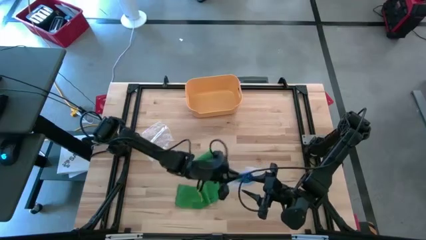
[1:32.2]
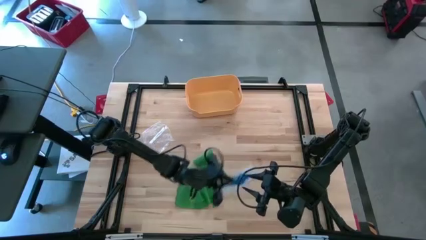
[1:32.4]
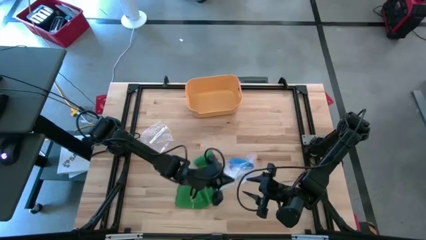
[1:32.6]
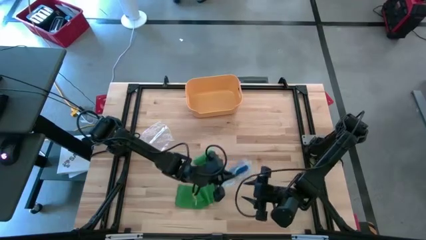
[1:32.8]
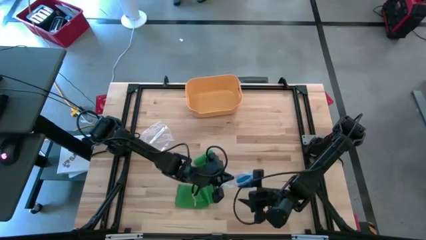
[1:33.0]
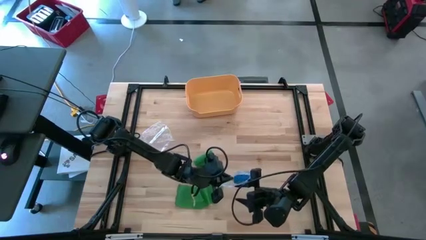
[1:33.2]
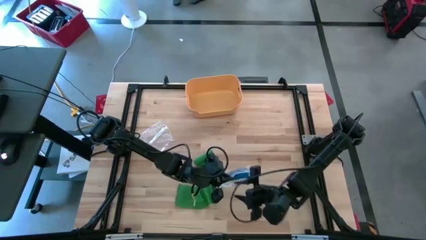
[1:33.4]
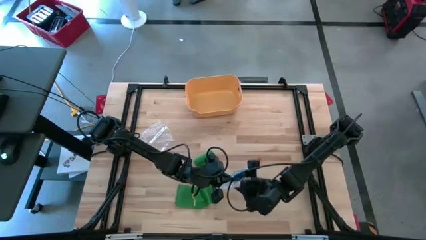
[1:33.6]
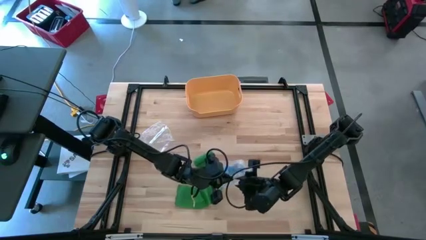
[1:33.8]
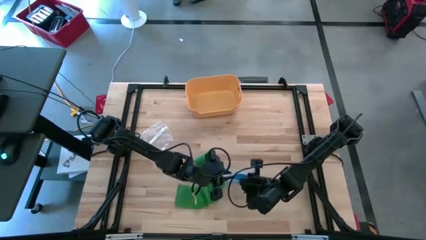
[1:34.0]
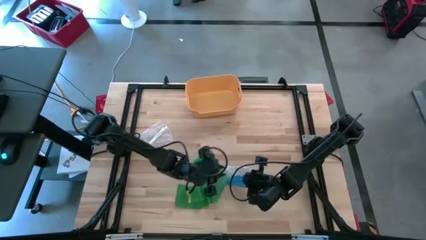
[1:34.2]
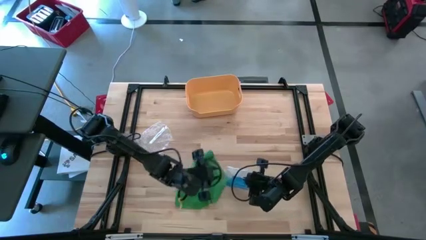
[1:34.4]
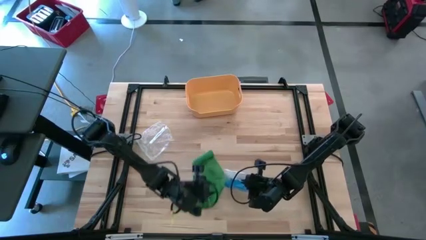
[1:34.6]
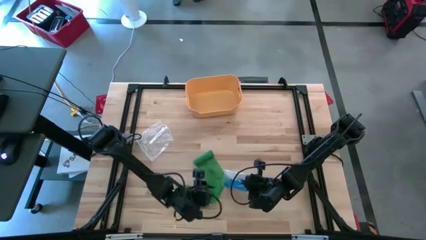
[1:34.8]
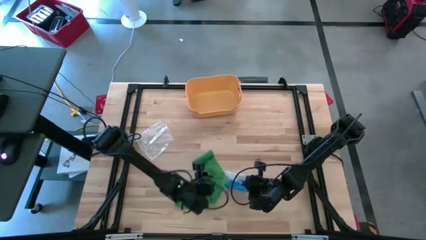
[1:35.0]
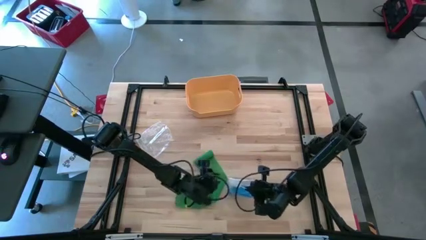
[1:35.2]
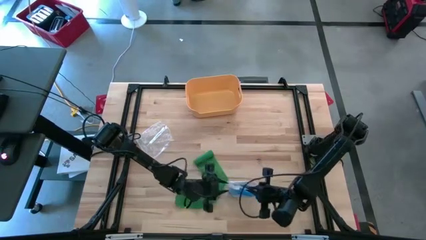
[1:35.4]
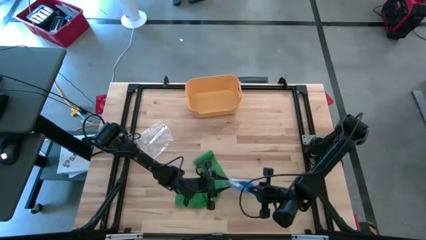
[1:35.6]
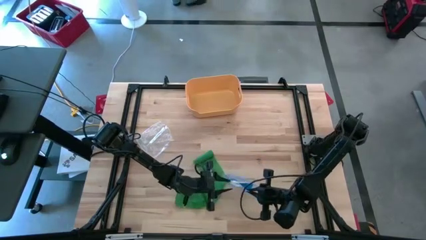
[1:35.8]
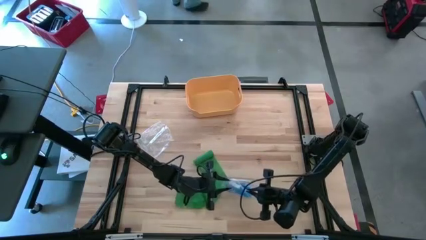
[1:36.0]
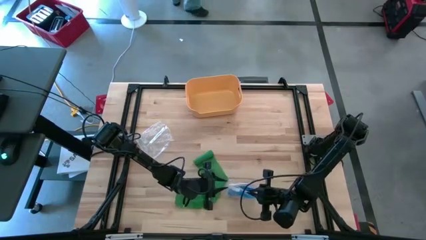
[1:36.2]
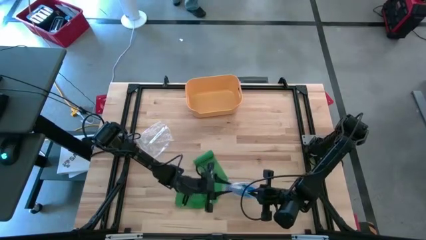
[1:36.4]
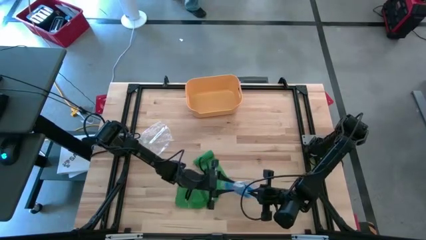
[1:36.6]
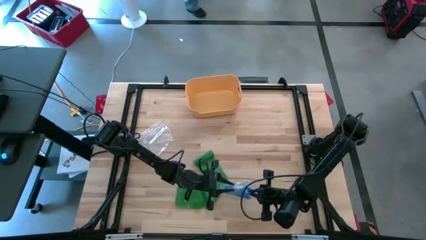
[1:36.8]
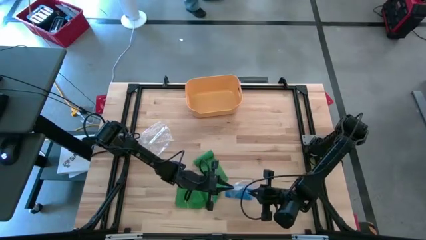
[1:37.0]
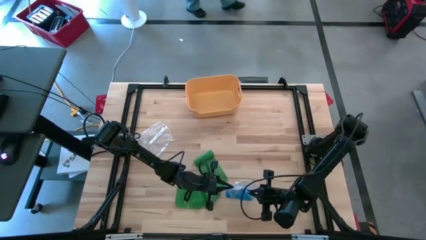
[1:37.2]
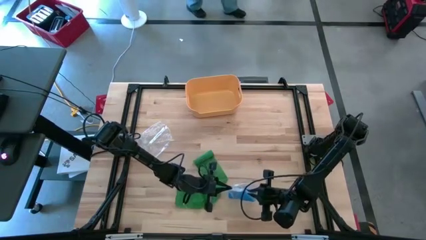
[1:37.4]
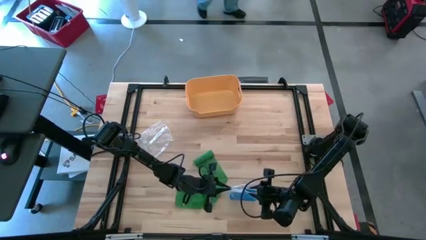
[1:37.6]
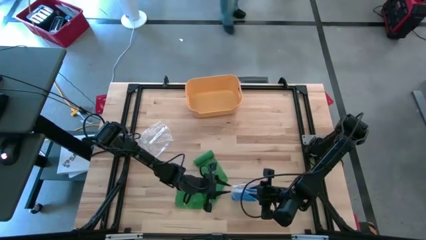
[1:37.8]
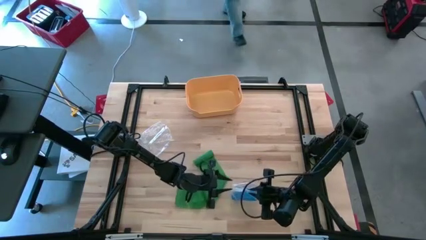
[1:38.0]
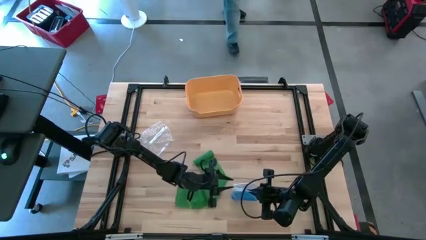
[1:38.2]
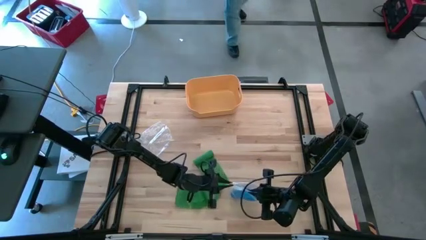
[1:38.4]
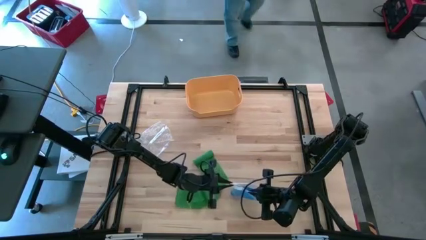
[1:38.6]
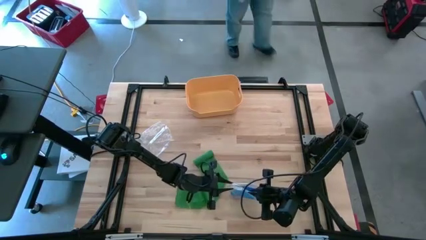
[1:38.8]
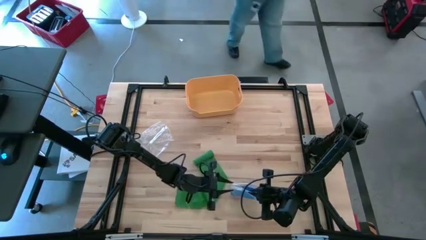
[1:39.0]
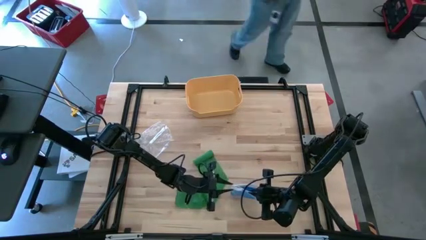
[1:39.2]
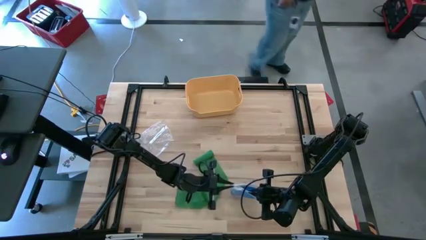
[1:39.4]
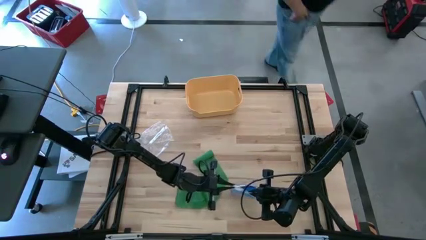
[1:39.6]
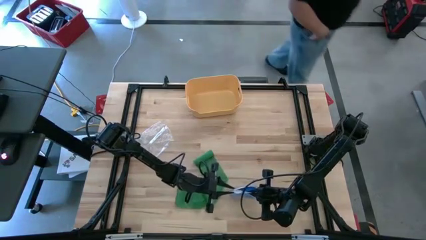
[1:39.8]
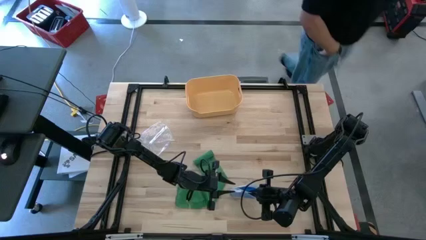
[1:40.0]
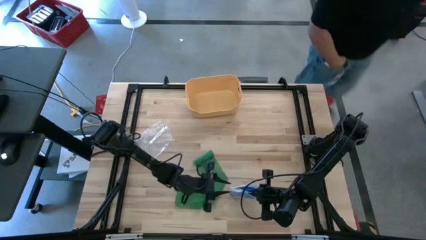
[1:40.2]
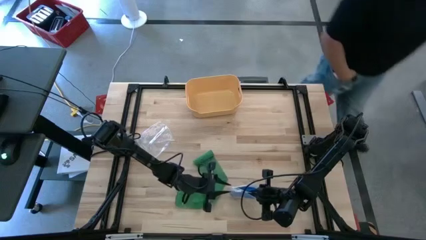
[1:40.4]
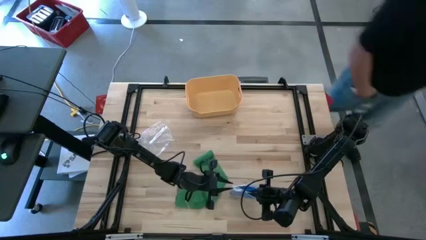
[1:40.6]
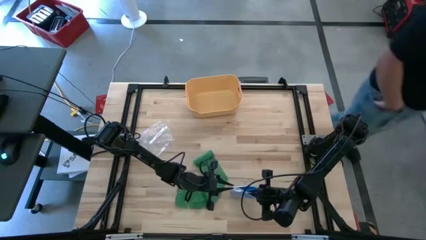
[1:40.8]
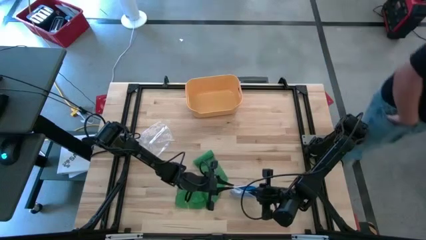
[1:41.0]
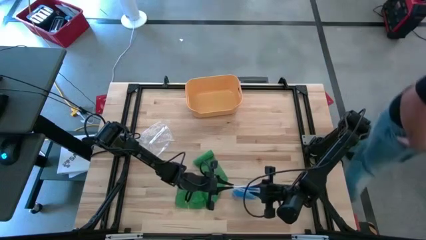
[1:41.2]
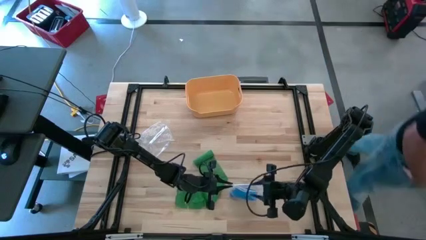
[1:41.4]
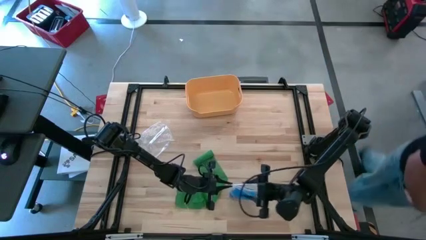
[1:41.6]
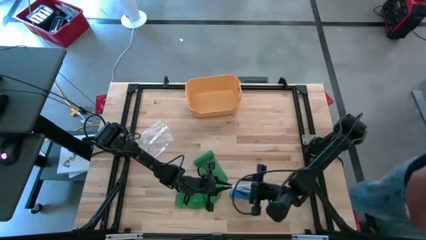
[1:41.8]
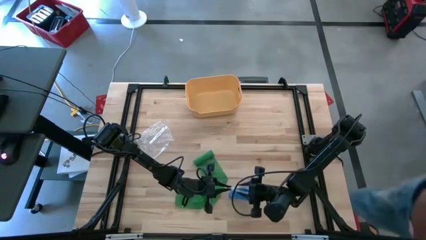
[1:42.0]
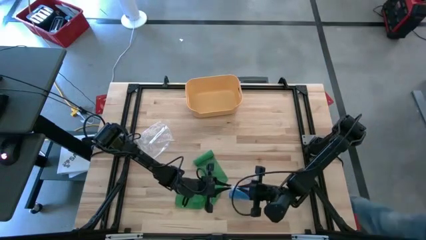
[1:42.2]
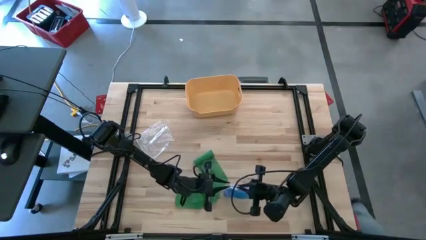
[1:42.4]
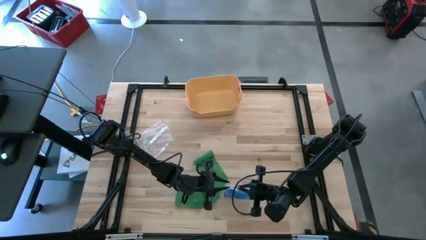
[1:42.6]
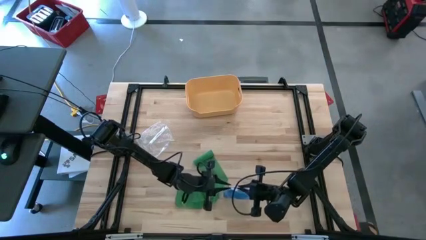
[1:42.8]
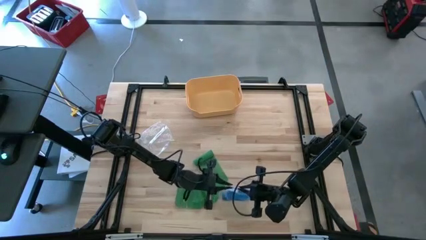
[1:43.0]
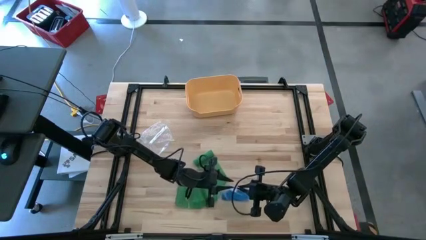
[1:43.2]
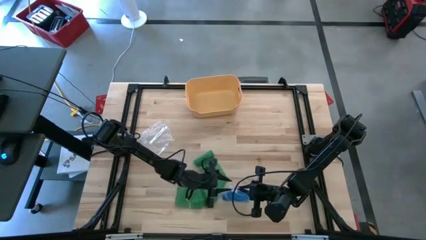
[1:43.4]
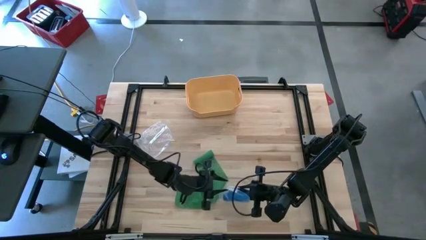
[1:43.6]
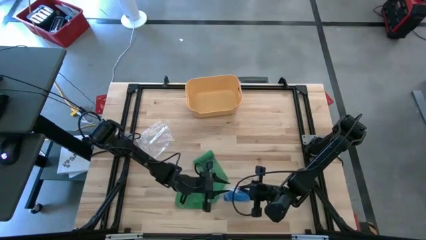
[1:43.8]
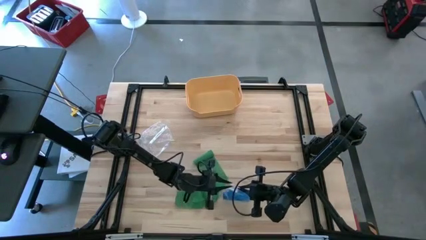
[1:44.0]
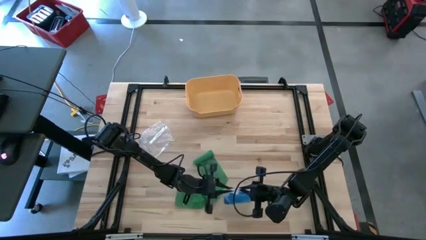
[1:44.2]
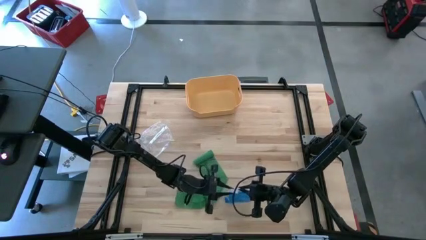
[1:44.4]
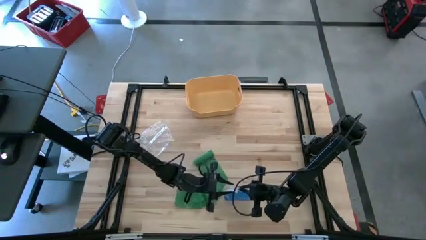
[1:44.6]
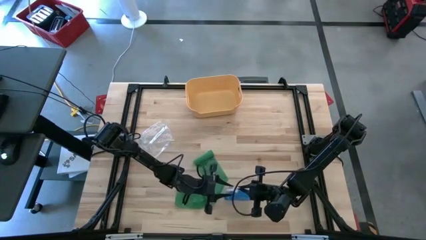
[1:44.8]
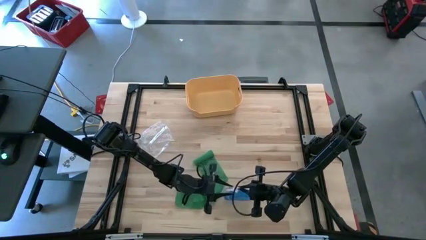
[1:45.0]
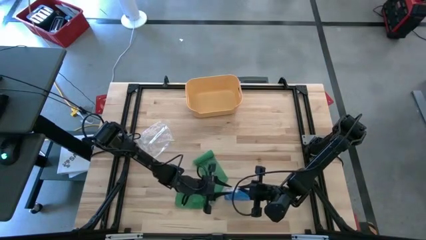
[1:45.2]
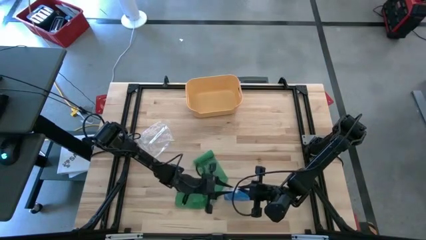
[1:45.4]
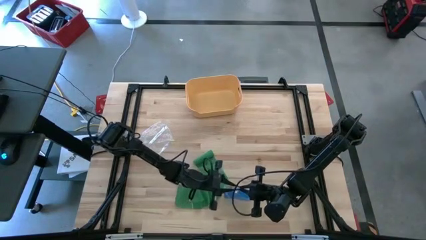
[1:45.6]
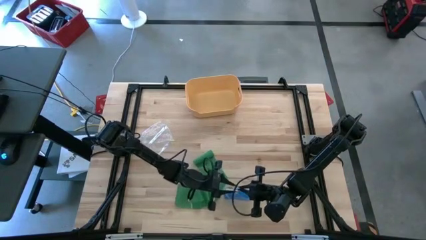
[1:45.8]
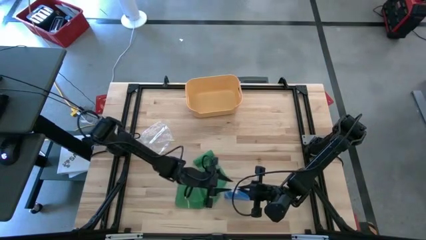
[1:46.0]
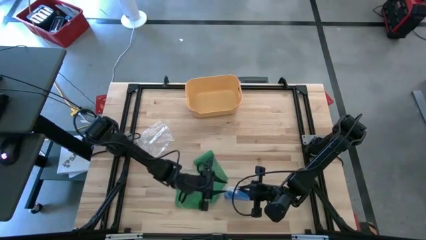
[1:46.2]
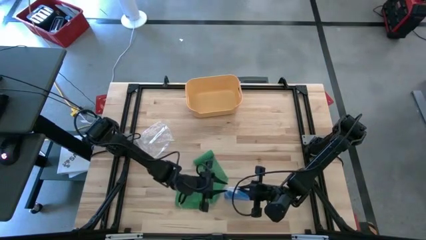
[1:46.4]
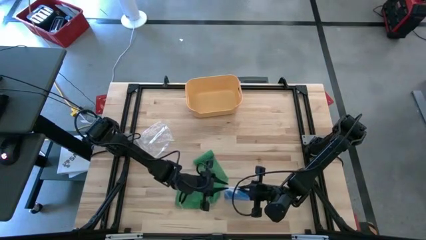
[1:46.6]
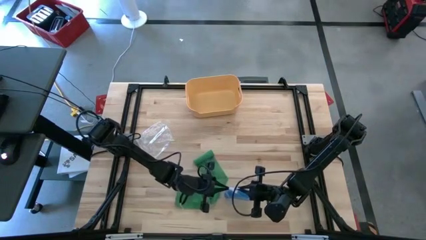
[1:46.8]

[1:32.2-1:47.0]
Task: Roll bandage
Close the transparent zip bag containing the rolled blue bandage
